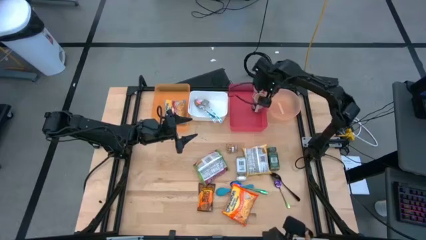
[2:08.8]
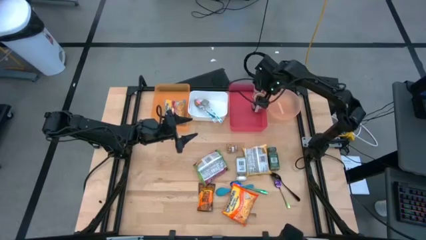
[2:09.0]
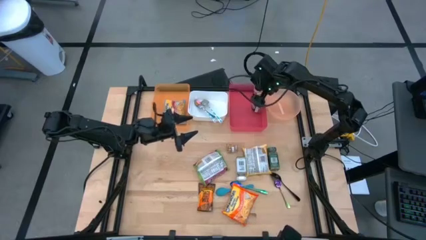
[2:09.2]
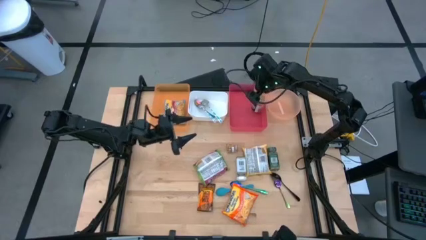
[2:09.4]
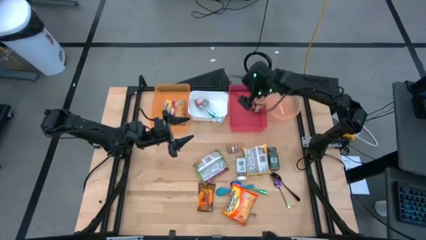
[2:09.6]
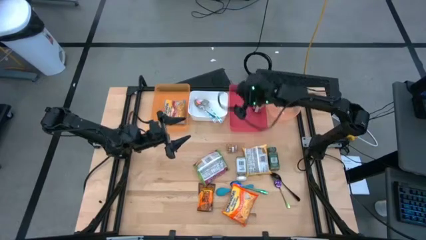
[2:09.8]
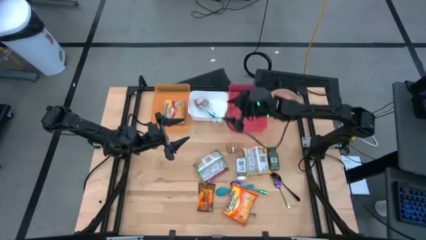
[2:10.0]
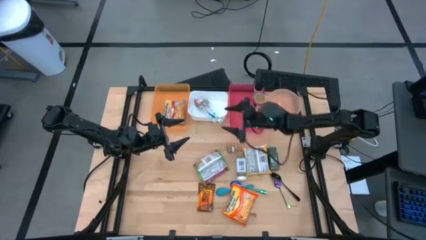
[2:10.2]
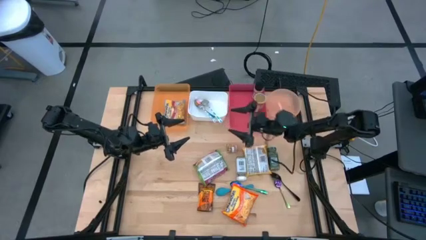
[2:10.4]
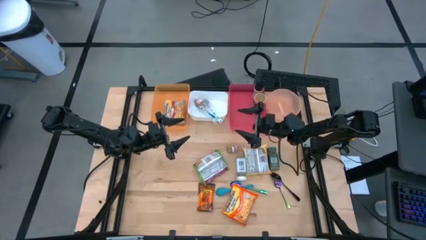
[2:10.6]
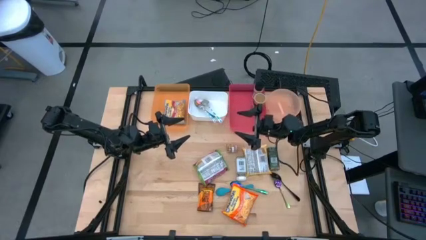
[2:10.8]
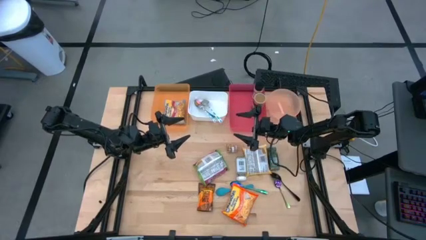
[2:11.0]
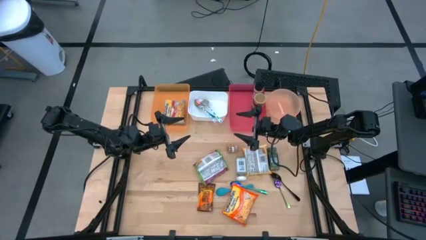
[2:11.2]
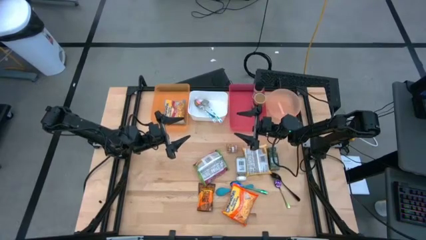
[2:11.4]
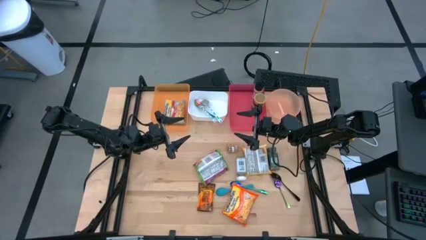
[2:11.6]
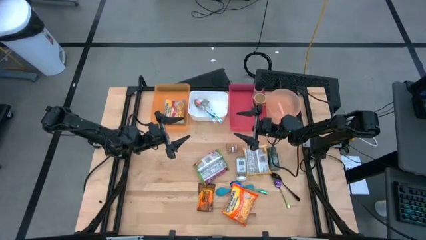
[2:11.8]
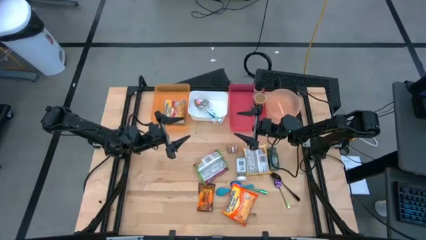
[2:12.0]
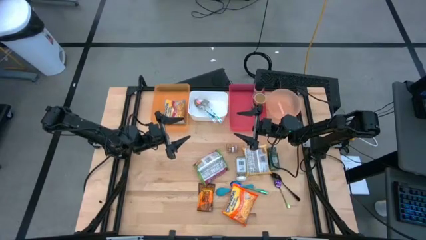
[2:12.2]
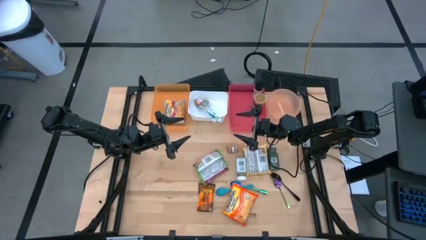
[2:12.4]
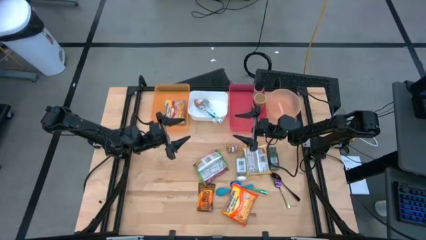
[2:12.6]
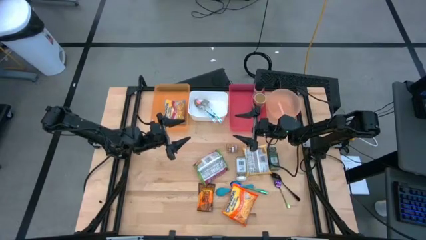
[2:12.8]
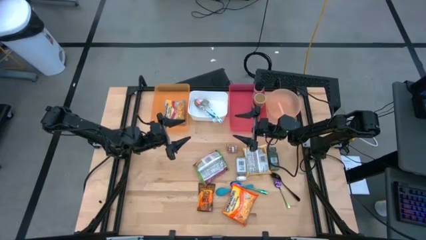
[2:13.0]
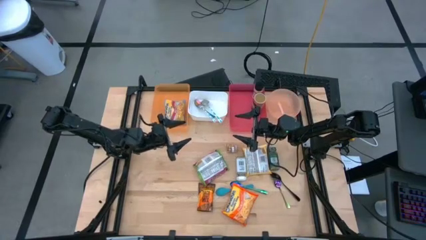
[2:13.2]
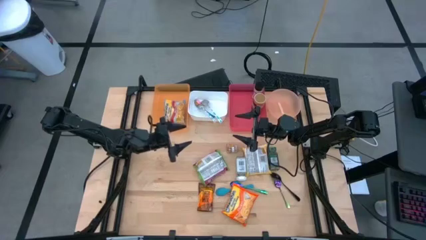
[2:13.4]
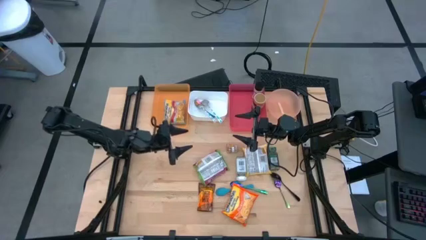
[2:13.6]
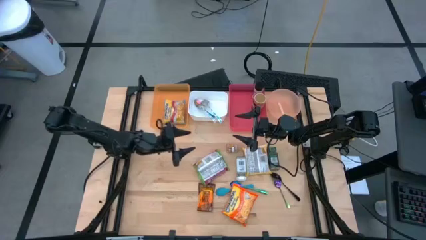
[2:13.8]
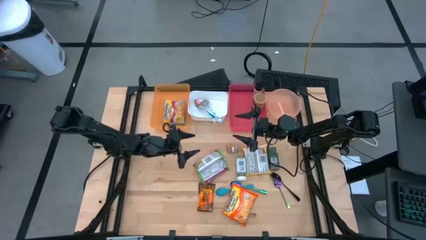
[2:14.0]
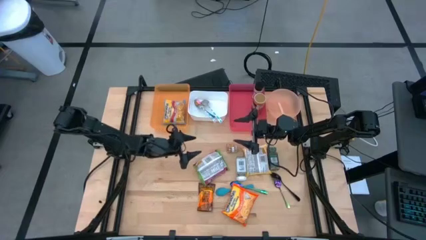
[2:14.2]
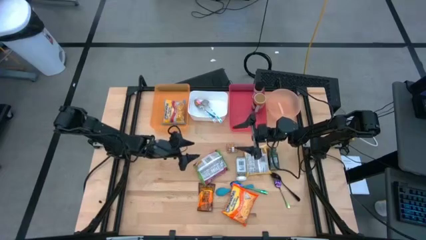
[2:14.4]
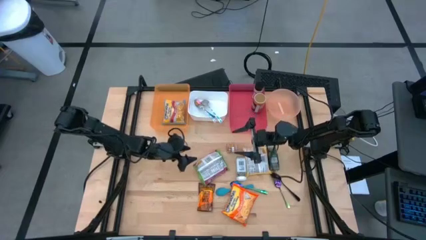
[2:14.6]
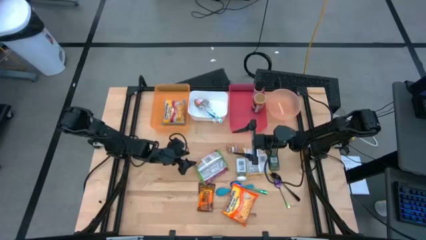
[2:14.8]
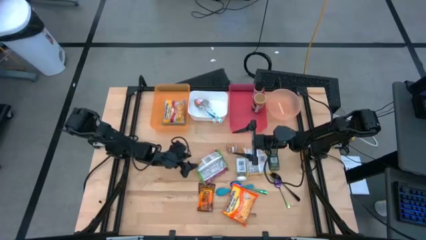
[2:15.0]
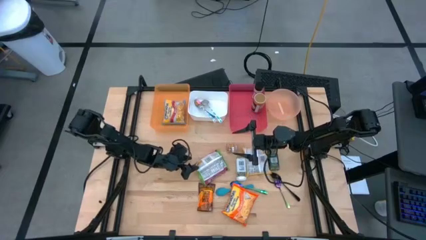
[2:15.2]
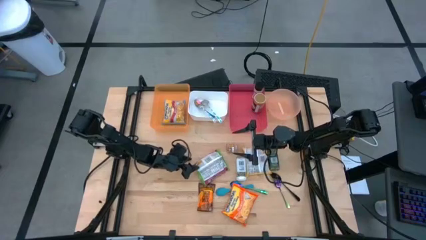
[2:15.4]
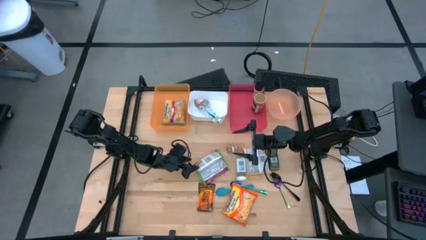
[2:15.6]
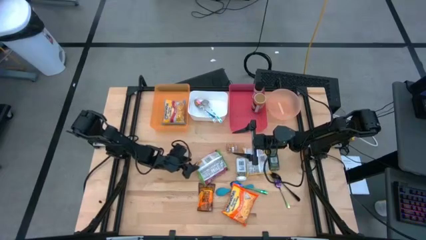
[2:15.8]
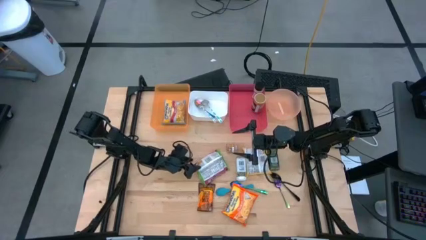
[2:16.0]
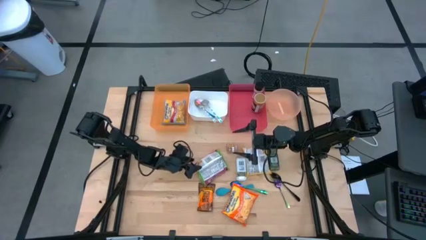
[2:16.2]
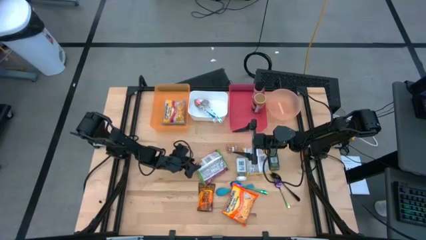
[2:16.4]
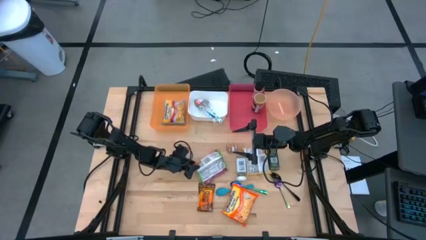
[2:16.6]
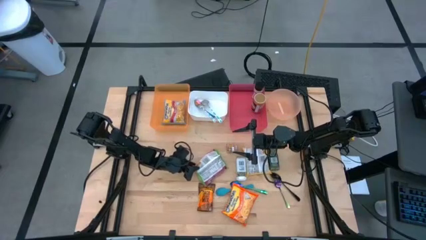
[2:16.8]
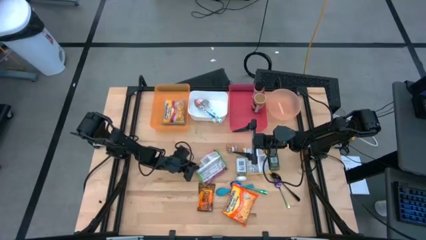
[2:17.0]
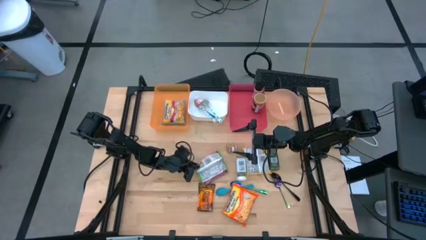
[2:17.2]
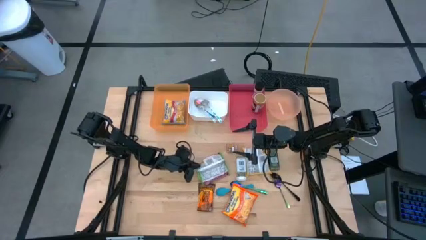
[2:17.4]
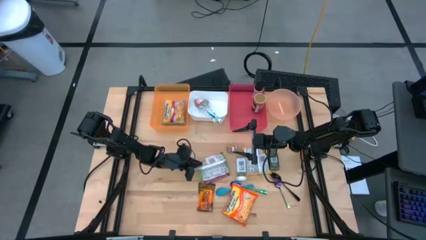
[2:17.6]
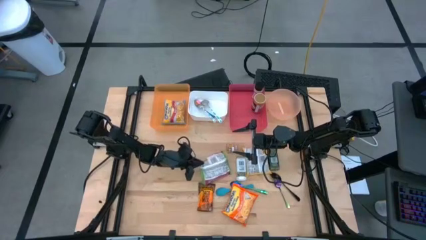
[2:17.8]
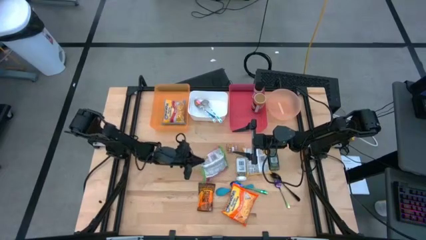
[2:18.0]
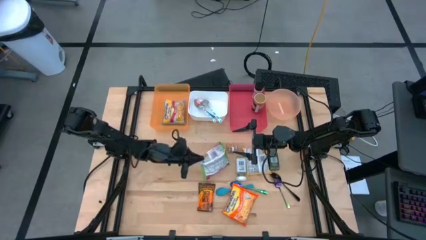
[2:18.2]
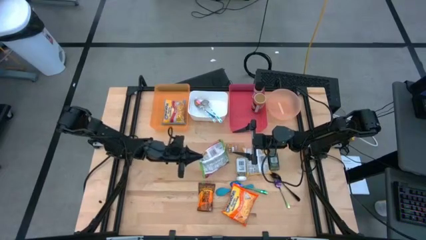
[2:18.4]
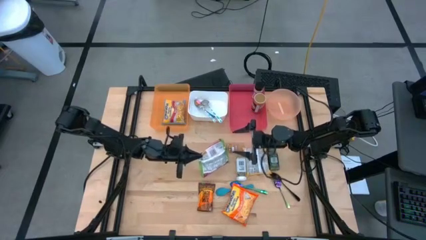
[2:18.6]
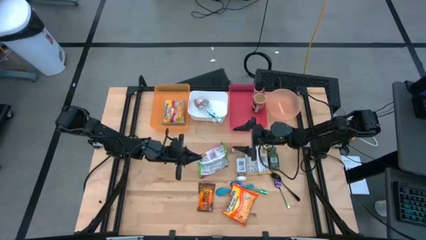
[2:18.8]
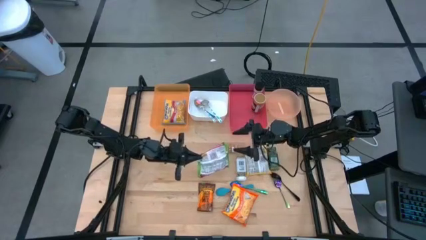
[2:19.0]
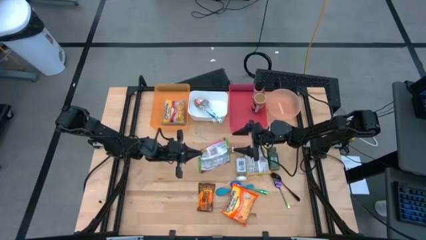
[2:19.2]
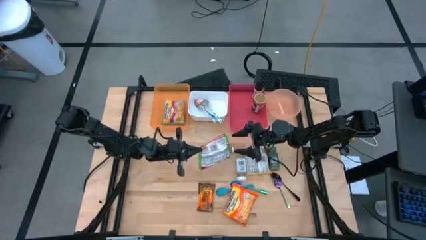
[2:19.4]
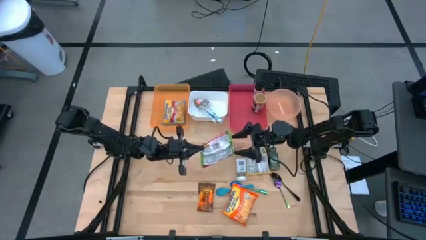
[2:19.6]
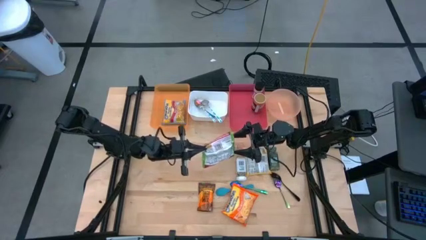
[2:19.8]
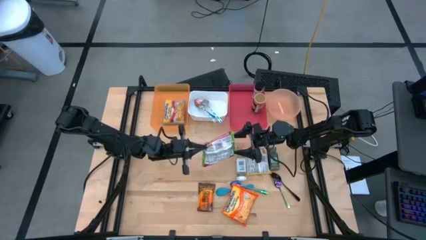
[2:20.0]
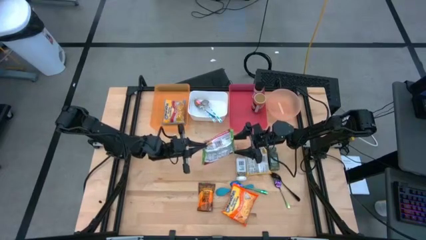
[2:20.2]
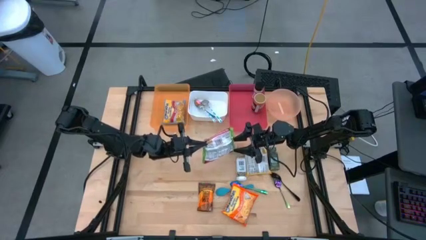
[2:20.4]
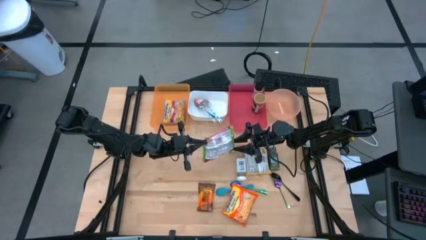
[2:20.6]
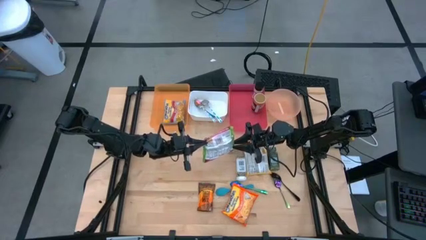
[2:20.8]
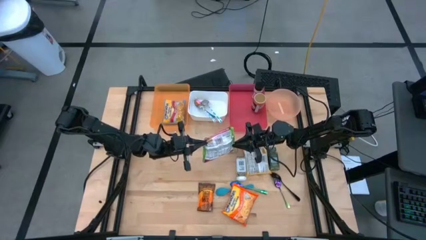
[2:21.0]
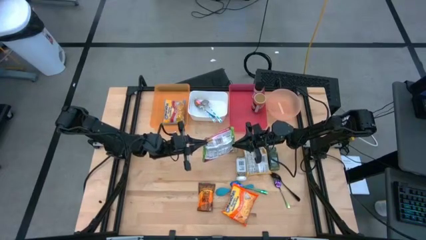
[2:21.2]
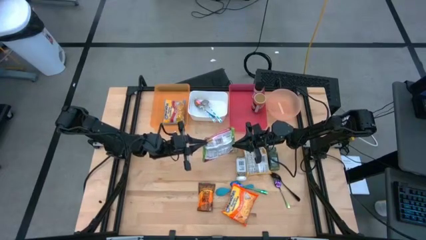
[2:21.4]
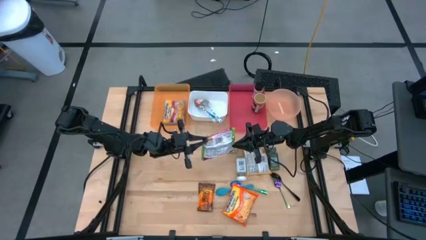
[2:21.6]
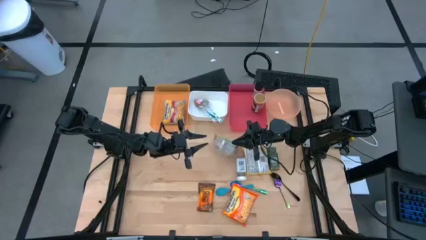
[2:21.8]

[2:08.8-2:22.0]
Task: Pick & Place Food Item
Put the green noodle pack into the orange bin
